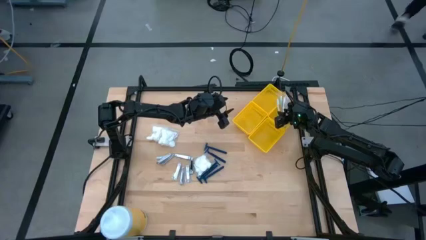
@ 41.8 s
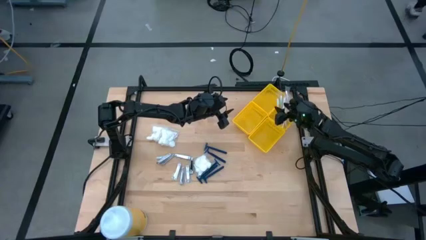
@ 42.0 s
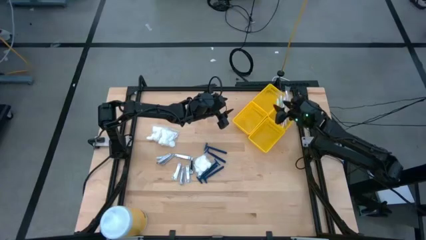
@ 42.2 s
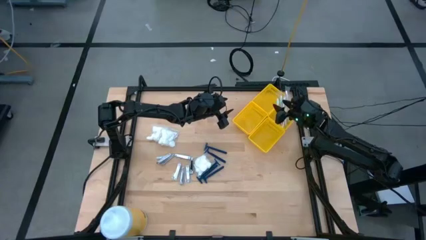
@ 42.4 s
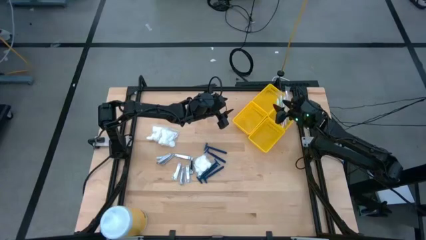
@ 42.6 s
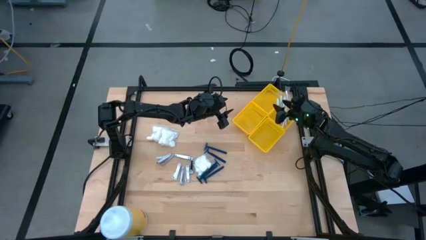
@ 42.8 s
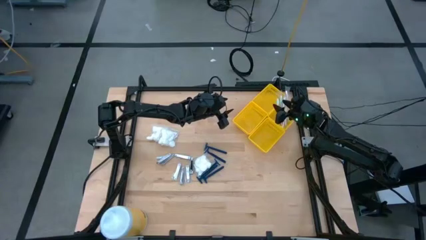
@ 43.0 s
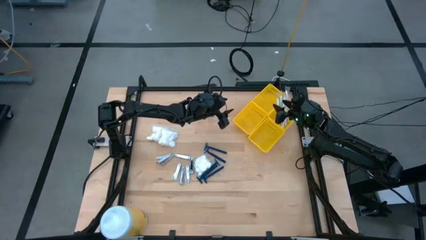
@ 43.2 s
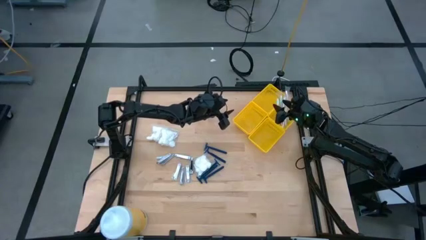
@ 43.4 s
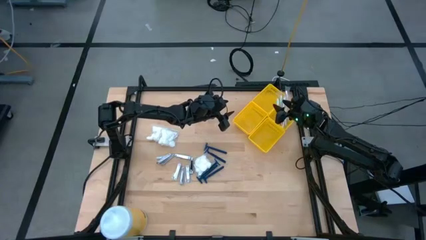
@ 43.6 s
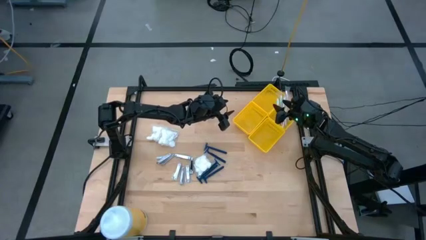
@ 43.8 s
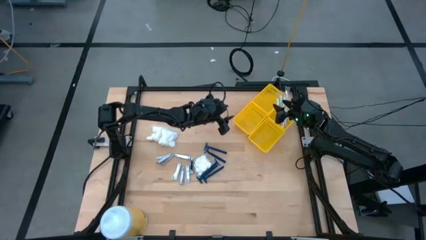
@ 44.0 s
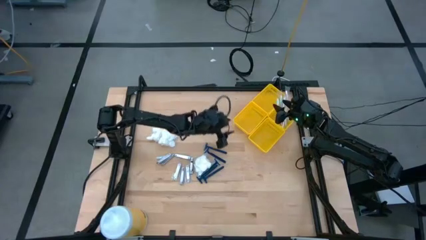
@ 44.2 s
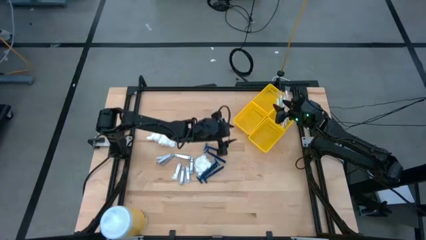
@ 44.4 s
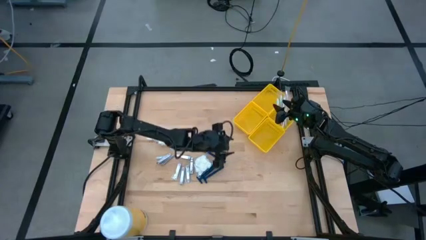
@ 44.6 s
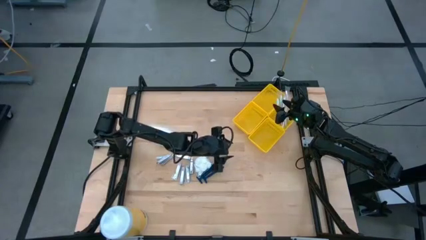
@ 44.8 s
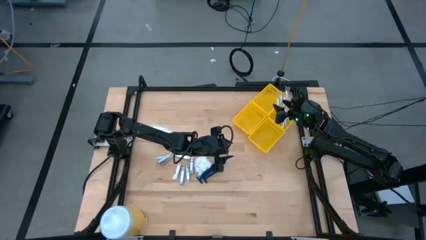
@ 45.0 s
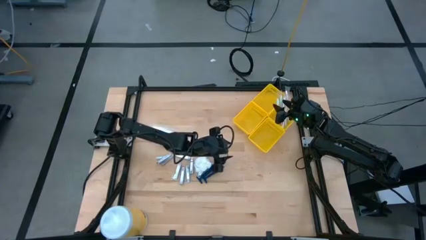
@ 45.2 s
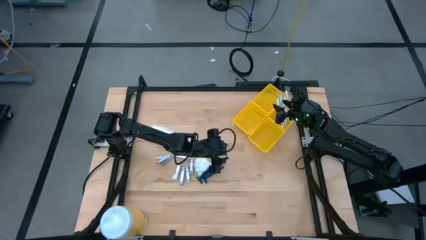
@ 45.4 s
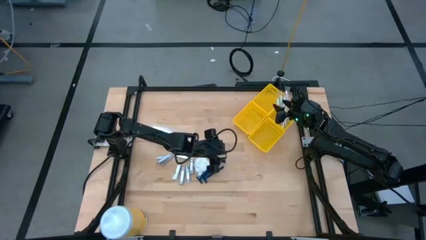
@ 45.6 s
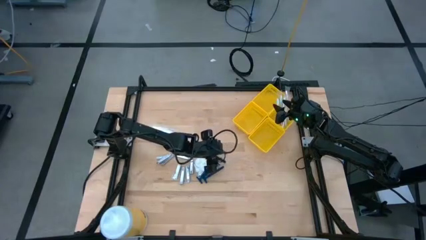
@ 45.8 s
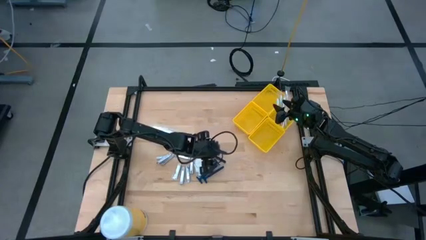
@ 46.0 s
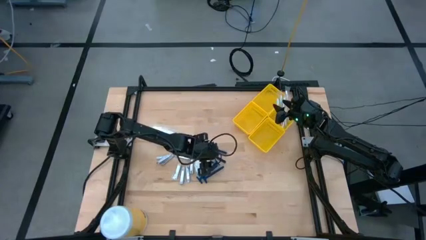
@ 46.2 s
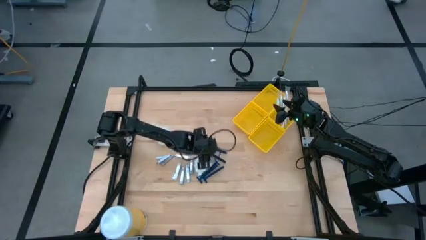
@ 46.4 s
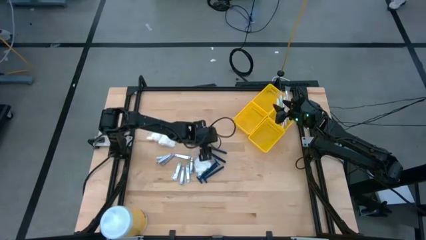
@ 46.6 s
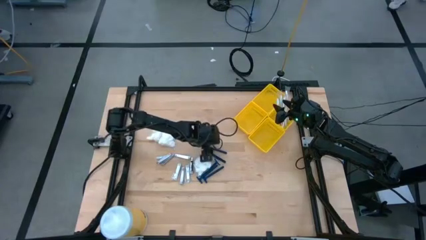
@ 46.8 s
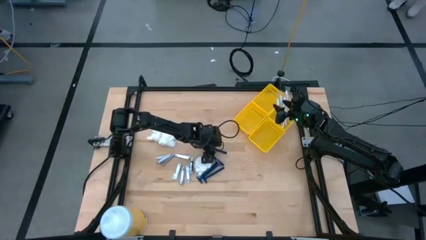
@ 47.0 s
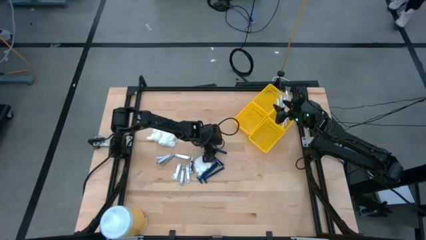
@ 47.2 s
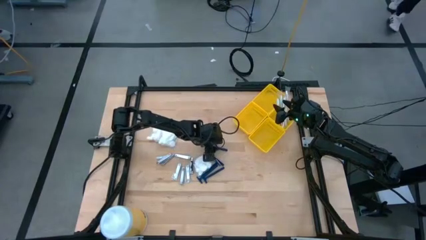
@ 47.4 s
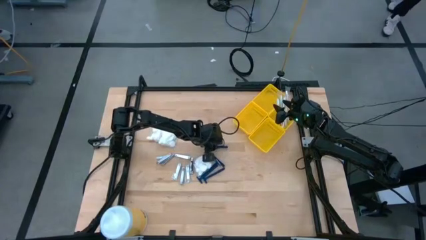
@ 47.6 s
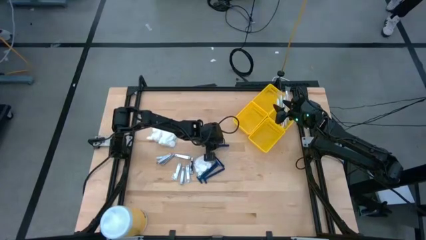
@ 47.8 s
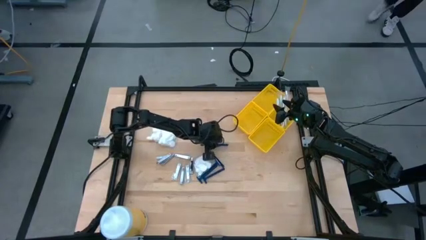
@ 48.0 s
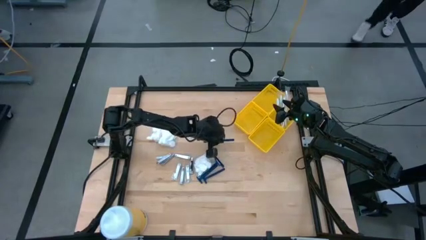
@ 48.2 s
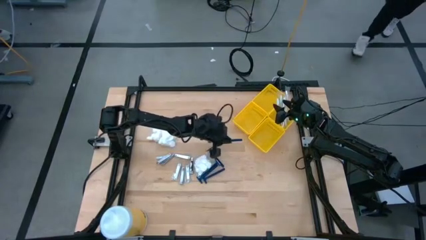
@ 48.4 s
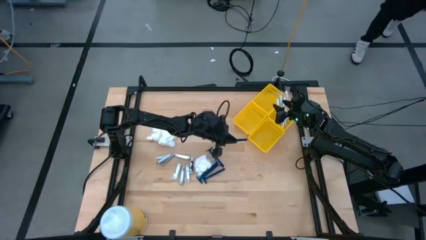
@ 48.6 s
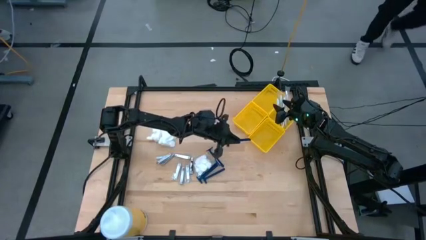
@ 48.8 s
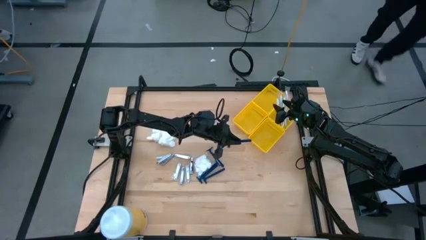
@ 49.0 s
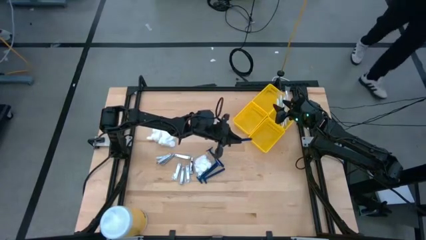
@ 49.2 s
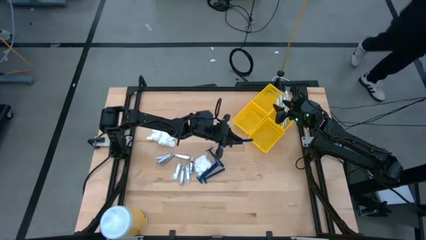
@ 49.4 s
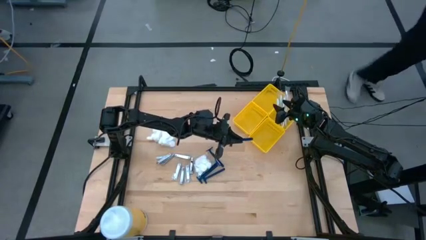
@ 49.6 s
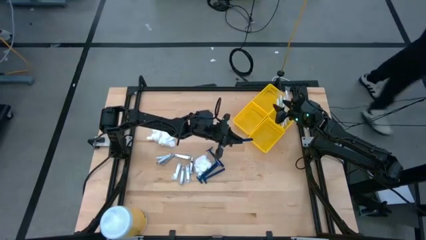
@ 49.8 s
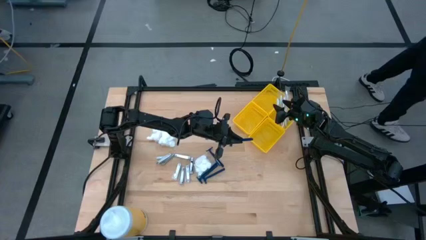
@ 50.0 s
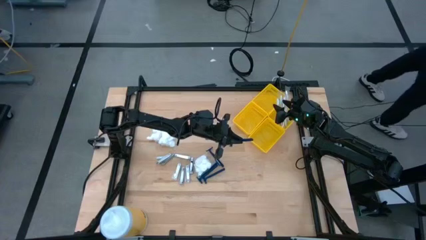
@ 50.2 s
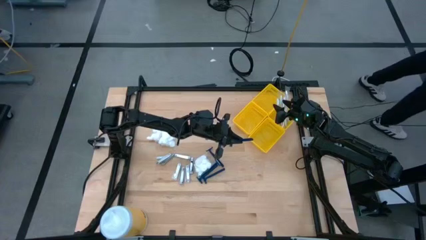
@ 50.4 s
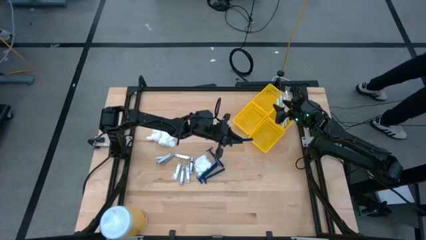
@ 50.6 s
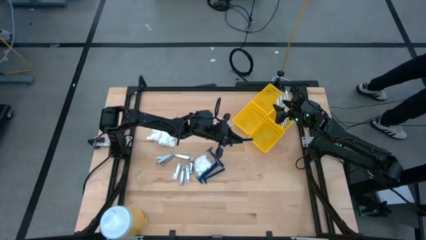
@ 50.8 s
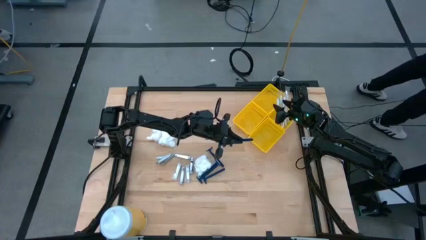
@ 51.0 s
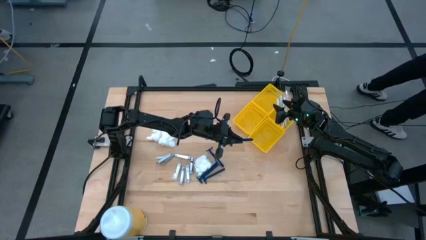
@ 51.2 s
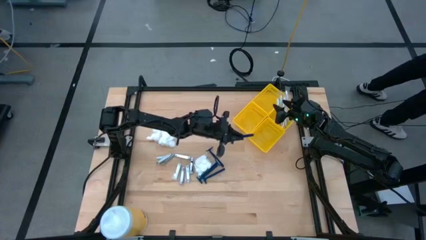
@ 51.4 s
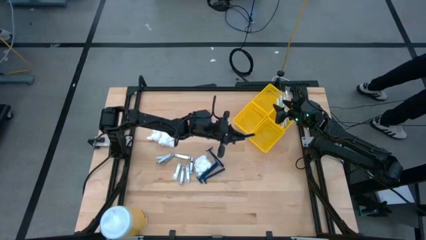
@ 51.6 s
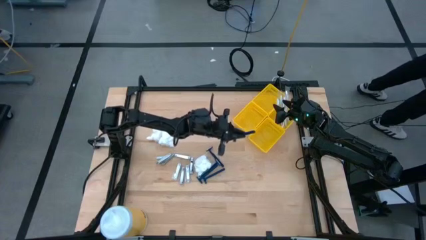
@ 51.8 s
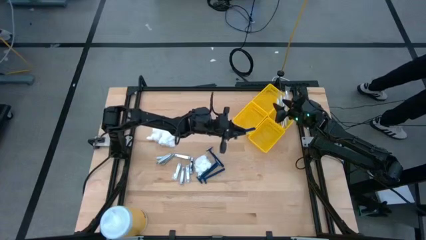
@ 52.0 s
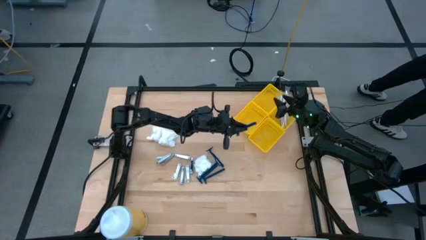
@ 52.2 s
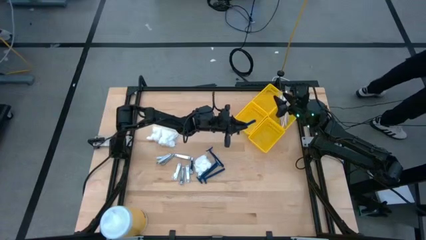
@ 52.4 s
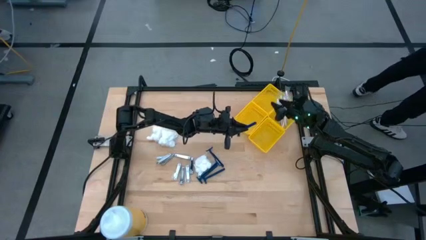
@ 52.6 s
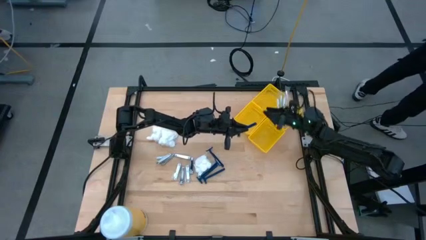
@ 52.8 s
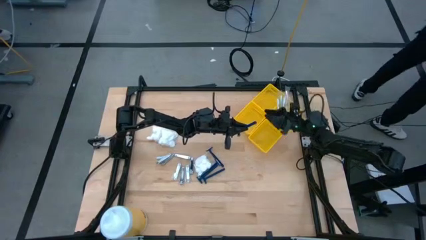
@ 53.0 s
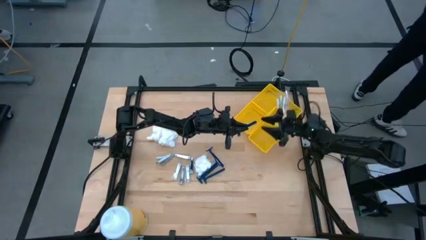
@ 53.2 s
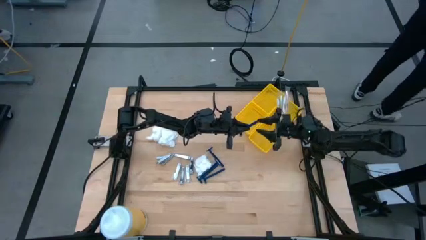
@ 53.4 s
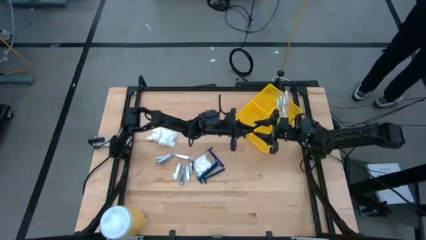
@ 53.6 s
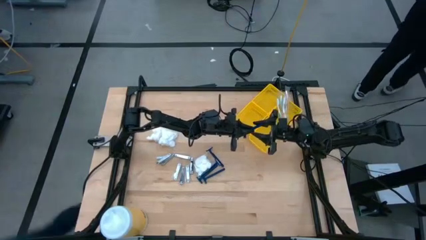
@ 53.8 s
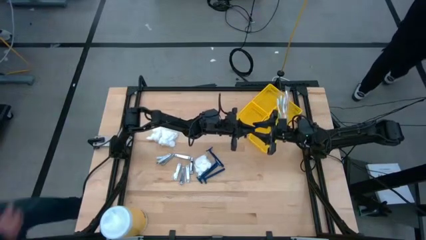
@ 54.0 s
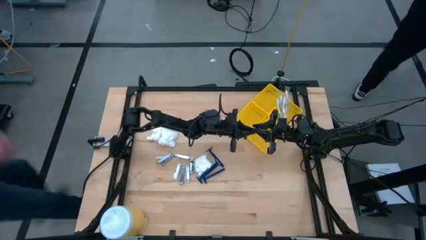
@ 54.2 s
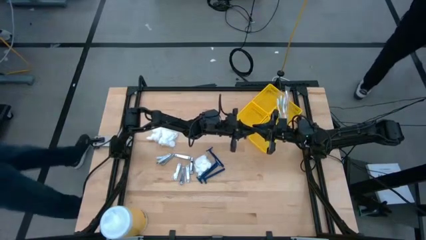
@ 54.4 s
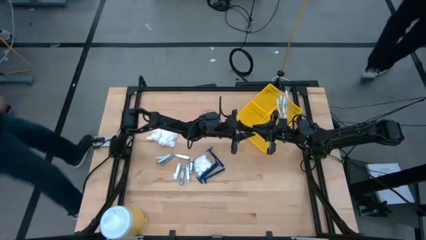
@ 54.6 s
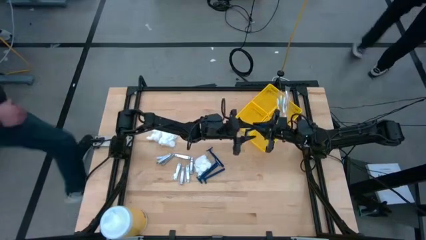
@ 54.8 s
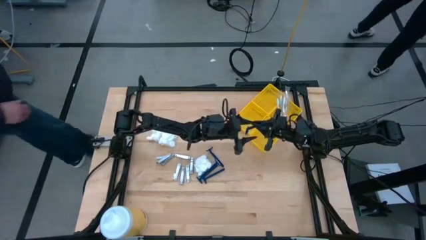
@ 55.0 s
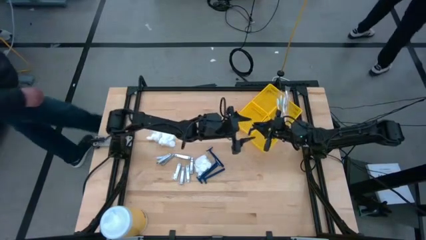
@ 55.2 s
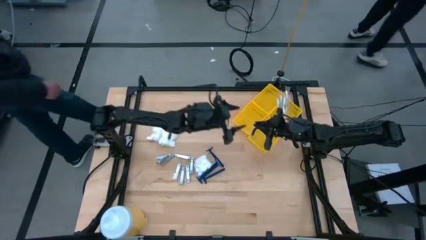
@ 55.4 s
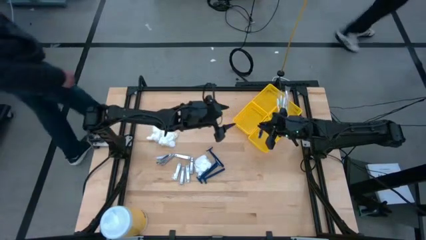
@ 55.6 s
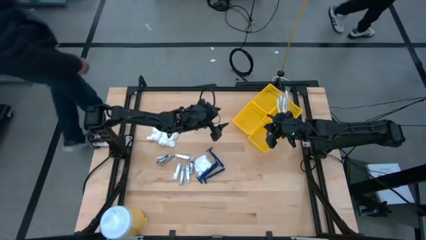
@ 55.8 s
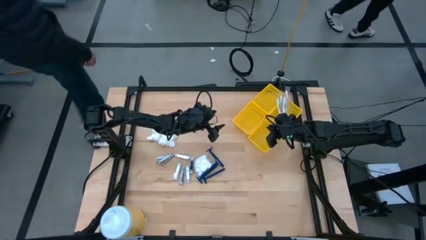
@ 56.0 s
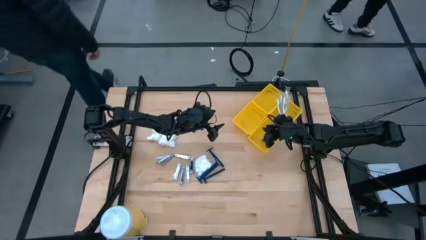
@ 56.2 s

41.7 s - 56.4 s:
Task: Pick & Place Travel size toiletries
Put the blue razor into the bottom right yellow bin
